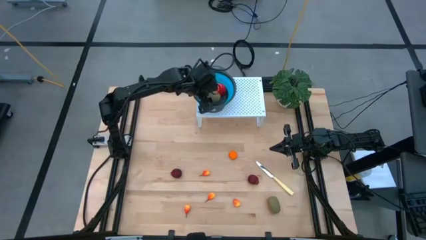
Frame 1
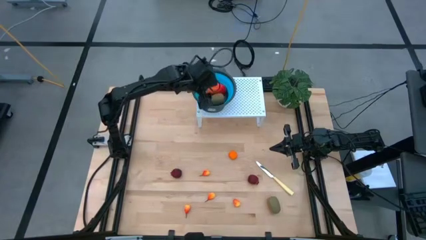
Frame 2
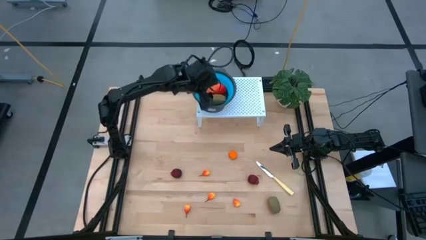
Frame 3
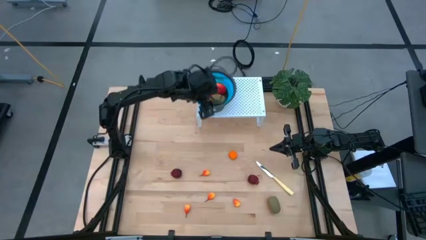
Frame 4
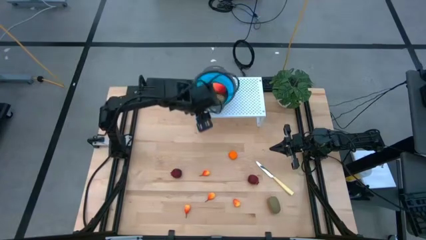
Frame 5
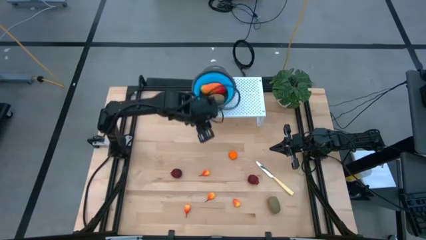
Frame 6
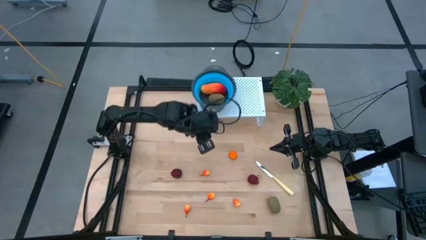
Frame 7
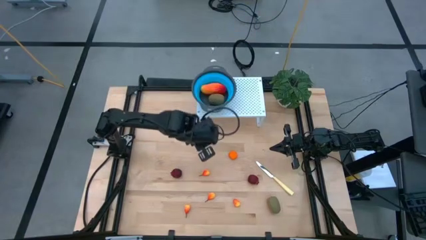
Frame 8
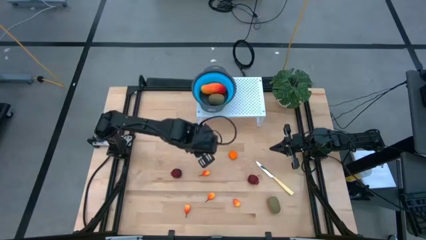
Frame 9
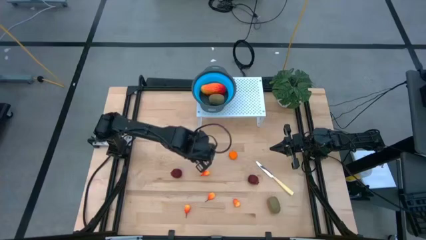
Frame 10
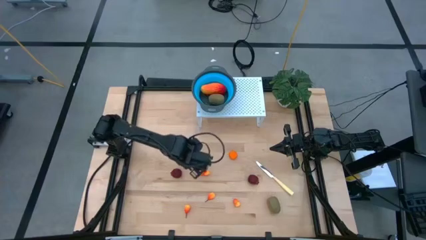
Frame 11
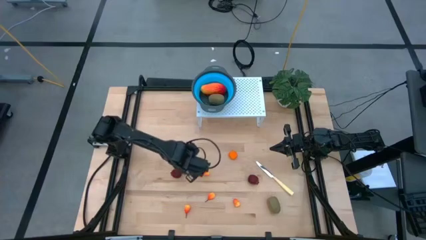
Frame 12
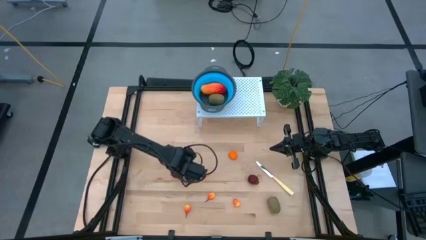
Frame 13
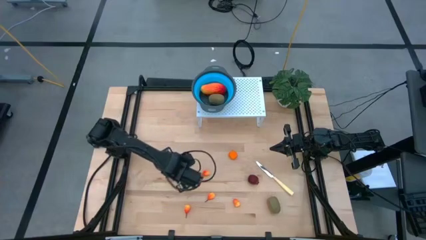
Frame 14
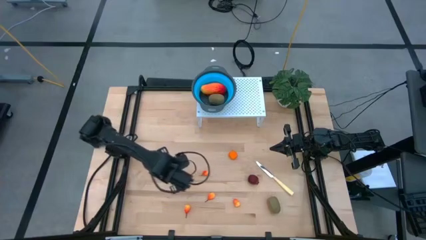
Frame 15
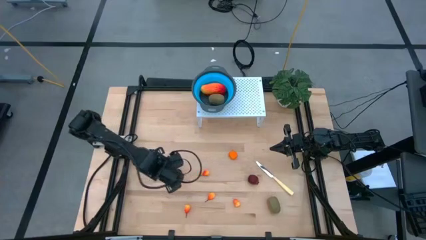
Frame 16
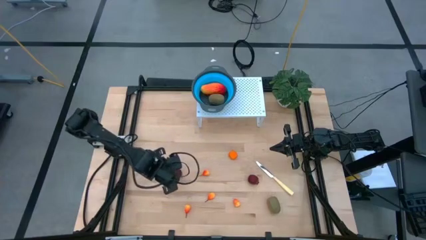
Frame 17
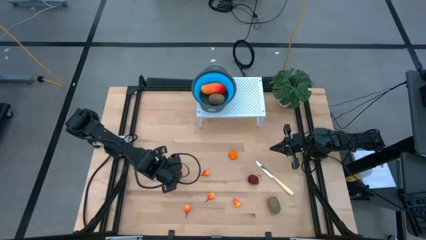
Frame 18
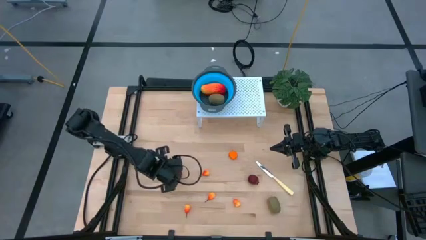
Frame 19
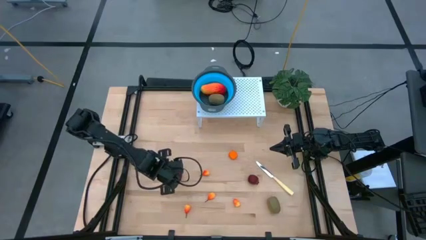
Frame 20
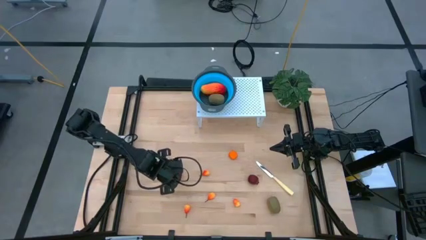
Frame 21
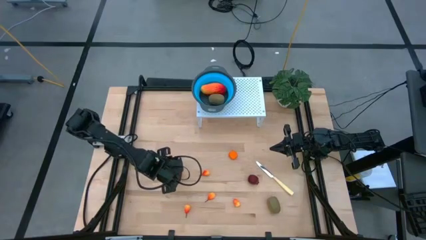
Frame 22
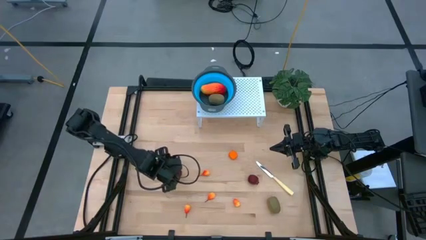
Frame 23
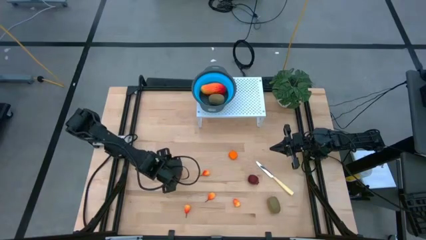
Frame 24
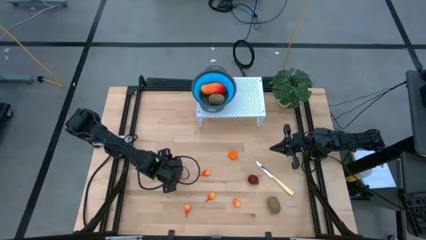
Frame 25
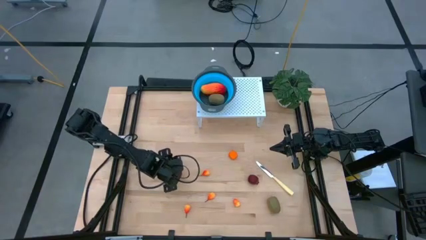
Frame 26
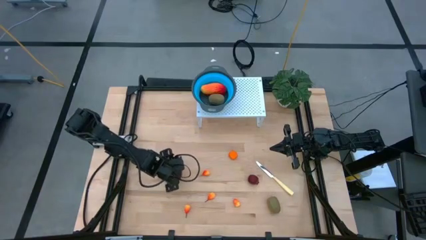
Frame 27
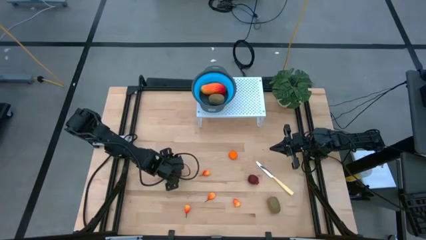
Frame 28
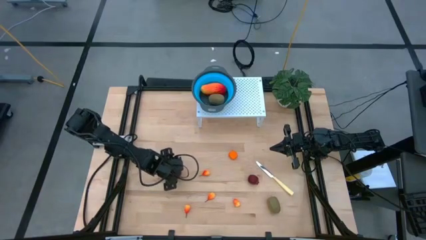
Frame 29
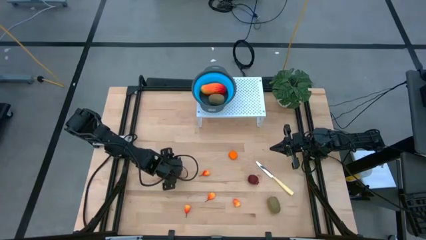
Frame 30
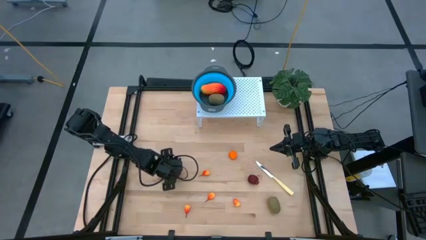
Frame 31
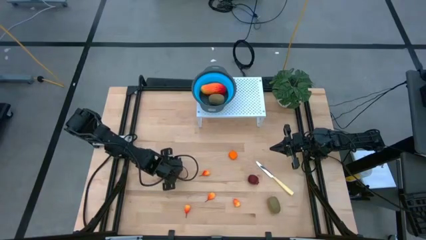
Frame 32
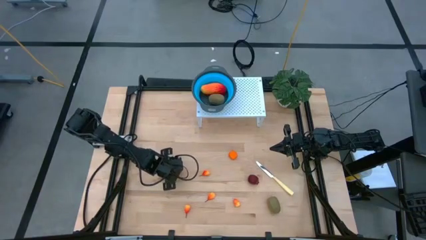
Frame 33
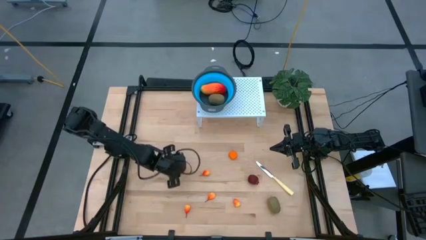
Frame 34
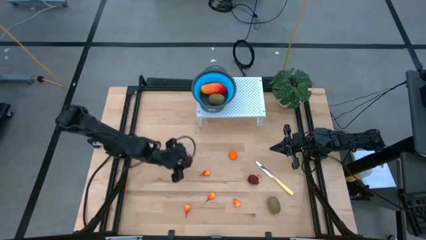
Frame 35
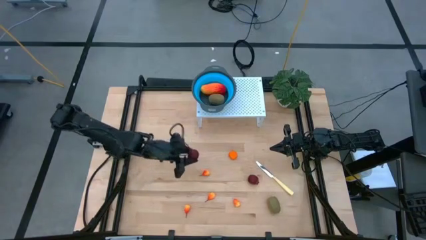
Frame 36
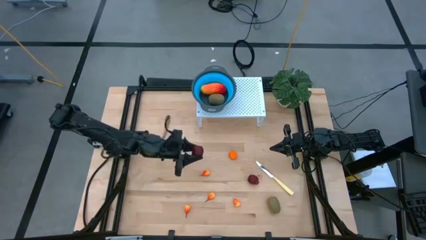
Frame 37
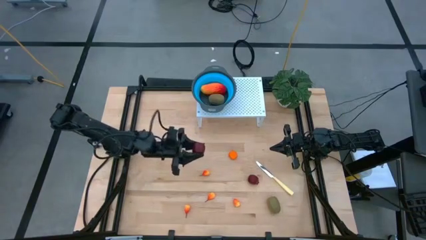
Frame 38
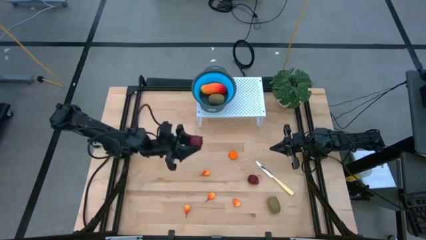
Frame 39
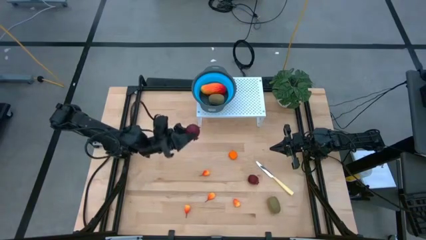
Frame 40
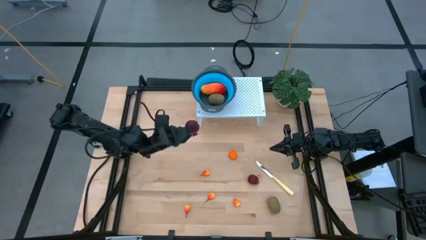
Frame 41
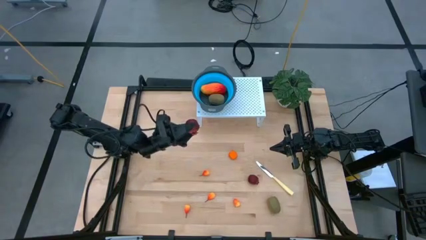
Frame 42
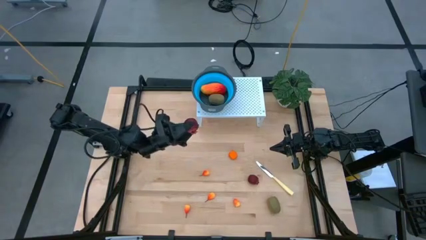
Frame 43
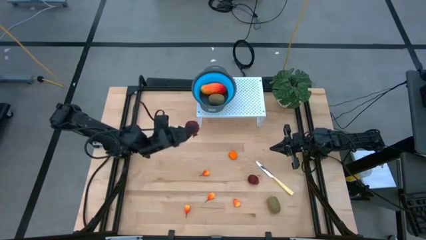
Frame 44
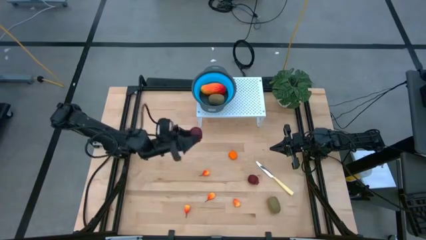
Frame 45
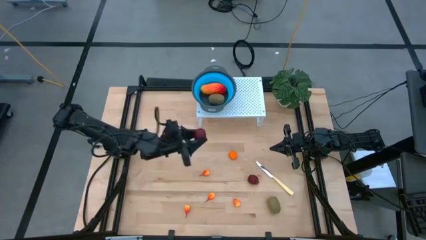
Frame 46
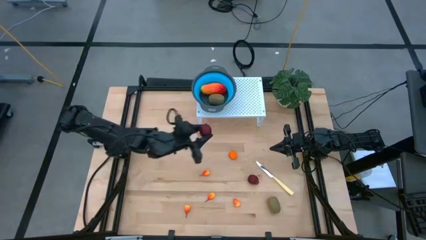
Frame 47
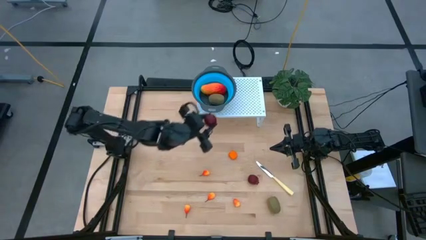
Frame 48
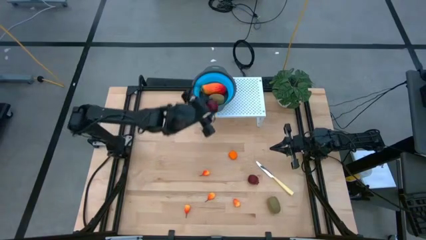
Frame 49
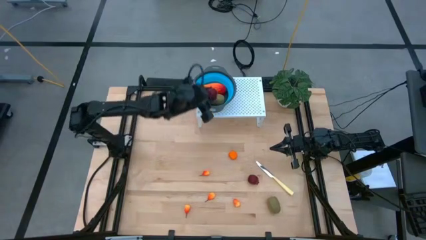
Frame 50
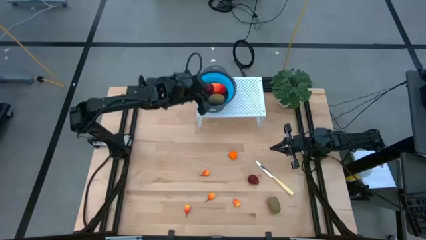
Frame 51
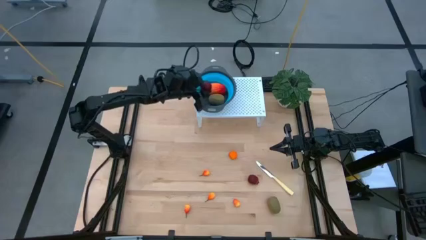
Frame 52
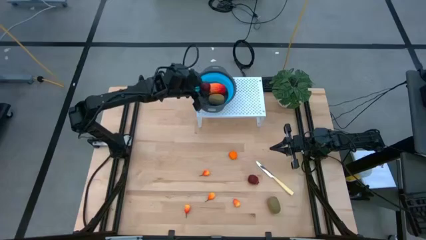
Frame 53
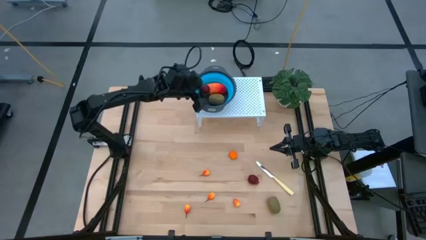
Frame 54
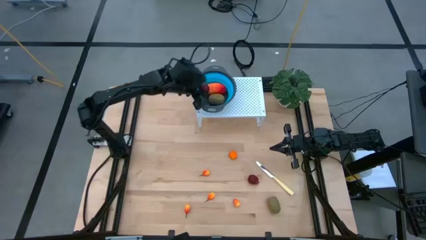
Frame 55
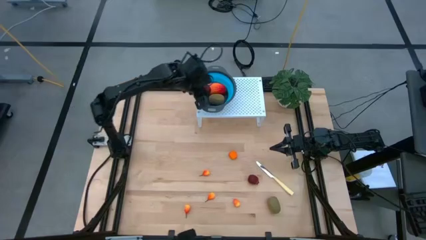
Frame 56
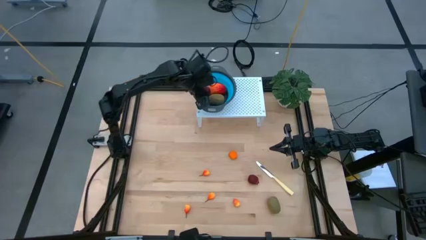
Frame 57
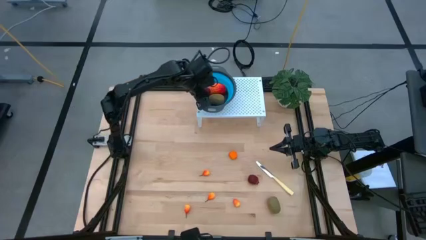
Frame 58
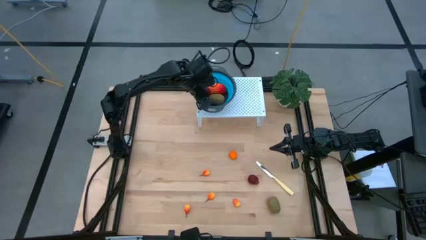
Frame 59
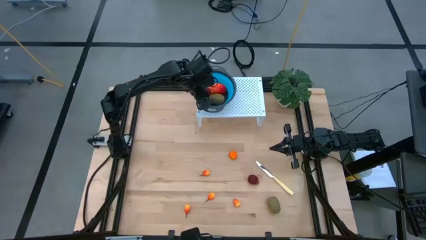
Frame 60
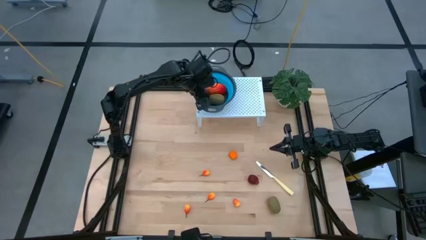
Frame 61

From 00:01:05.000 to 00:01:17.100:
Task: Pick & Place Fruit
Put the pomegranate into the blue strainer bowl on the shelf
